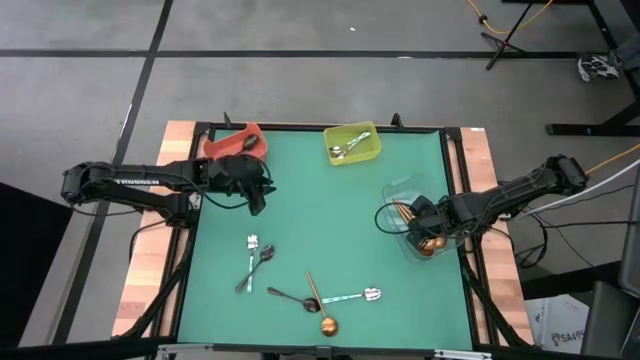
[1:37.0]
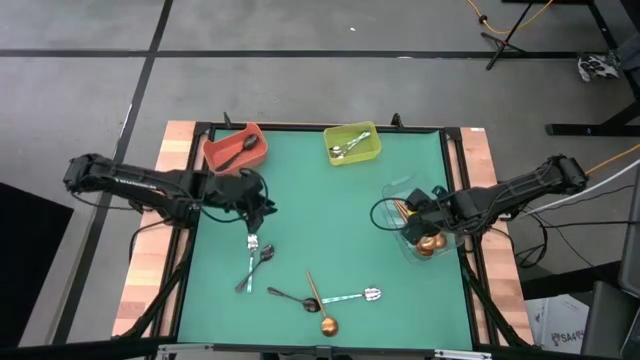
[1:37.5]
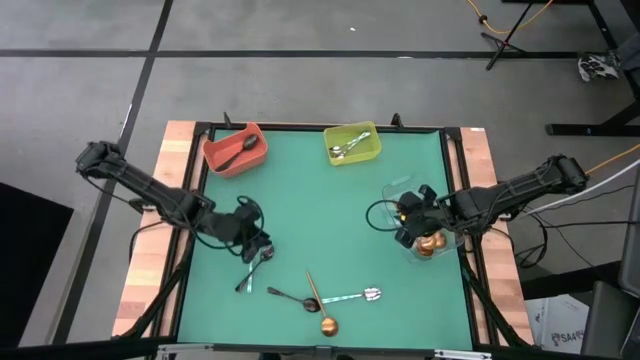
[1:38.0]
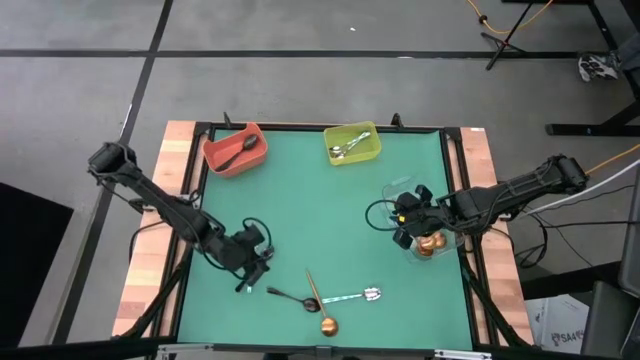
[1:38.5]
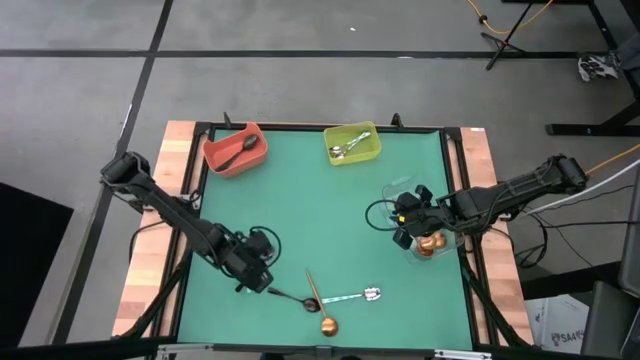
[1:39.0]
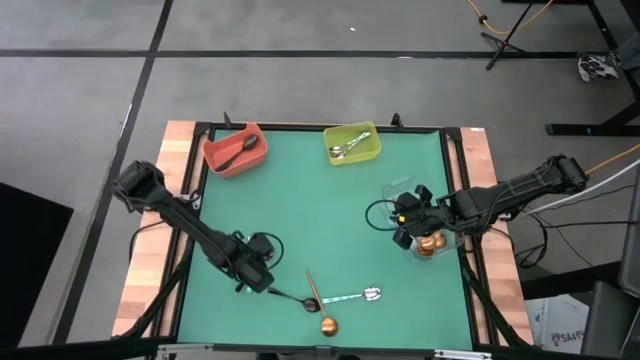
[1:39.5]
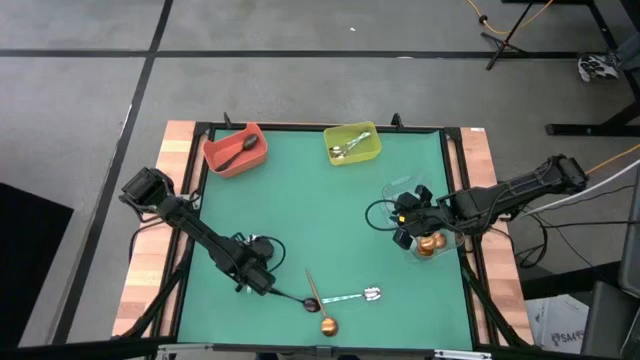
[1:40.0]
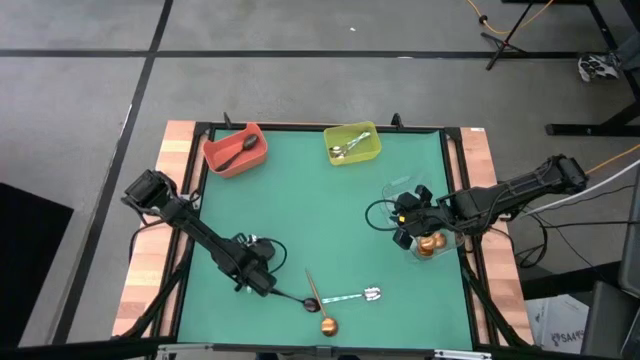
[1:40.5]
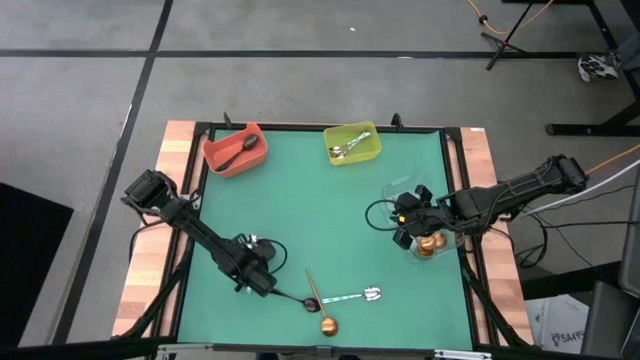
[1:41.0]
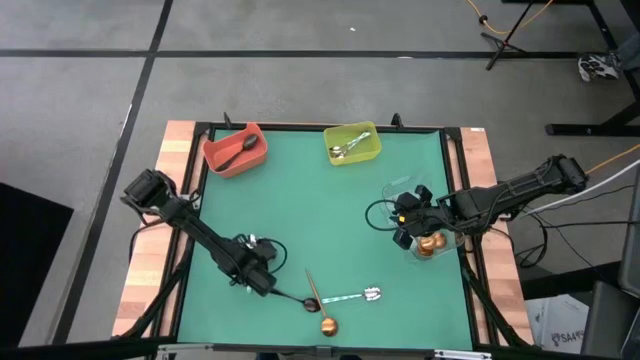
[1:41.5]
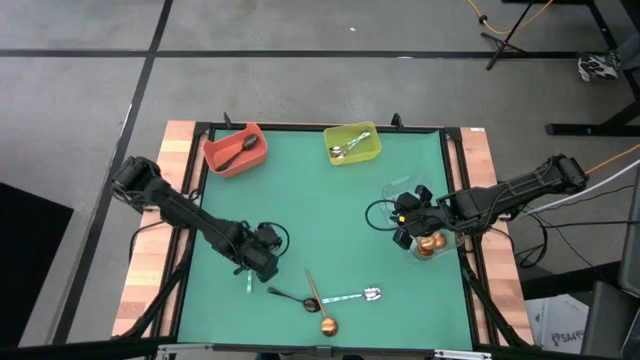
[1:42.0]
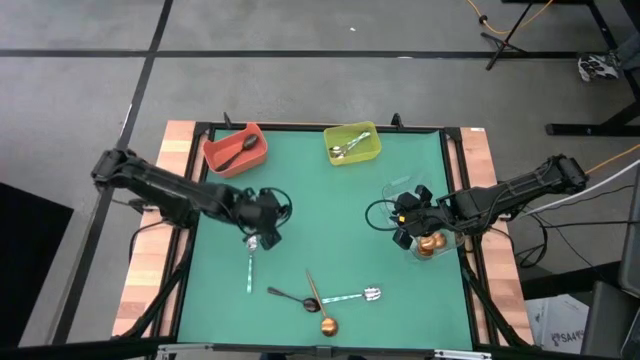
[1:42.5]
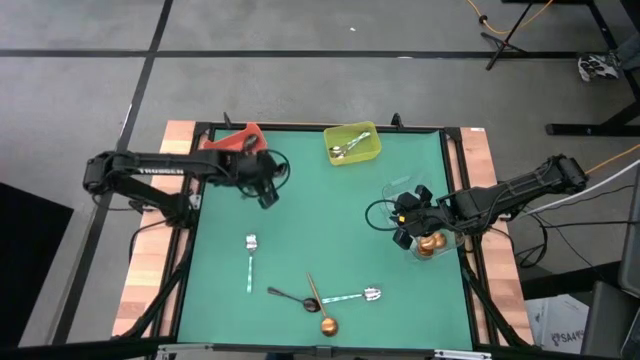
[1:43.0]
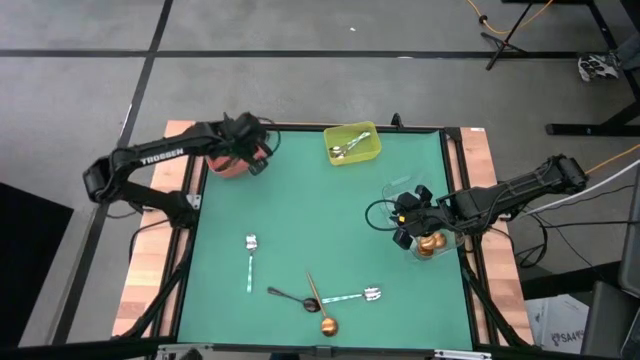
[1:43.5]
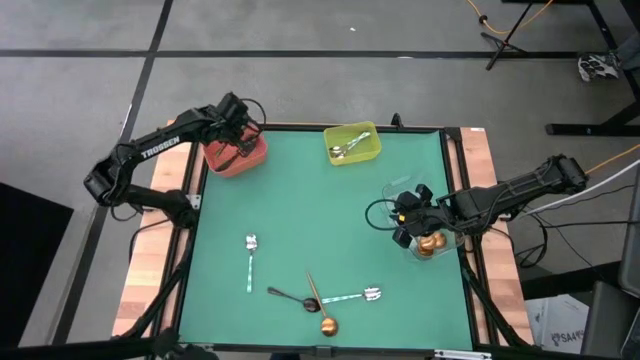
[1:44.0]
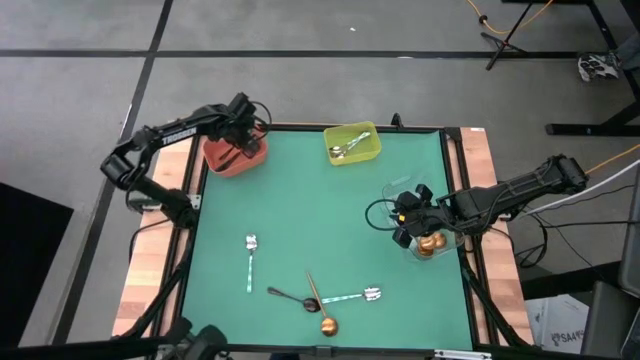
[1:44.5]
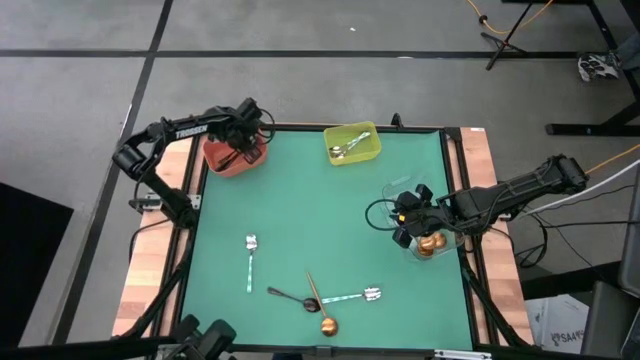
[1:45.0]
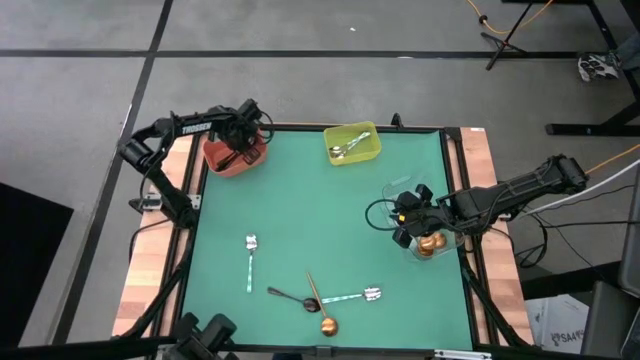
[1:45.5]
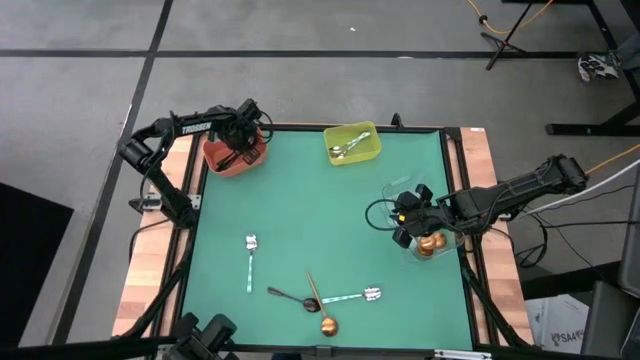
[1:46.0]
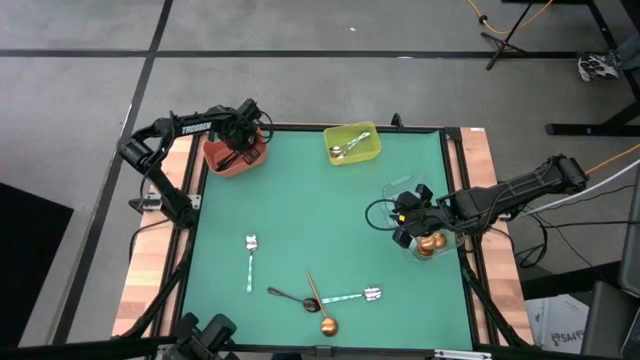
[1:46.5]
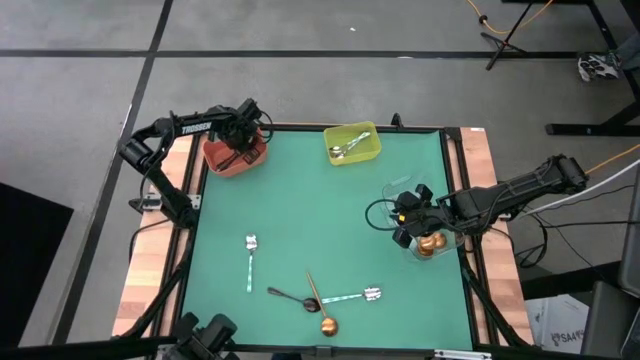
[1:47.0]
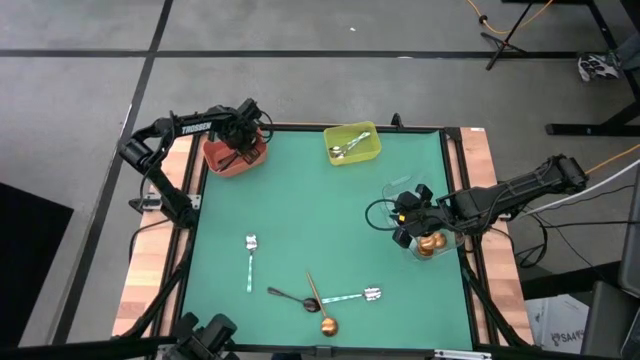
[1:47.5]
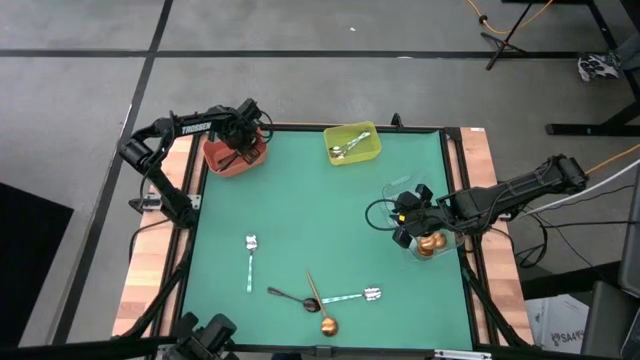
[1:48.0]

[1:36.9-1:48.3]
Task: Sort silverware by color (type)
Put the left black spoon into the orange bin

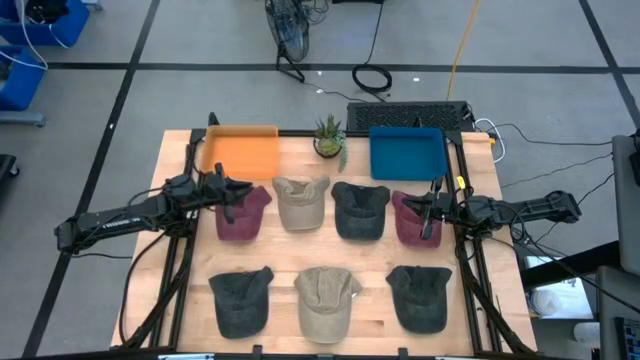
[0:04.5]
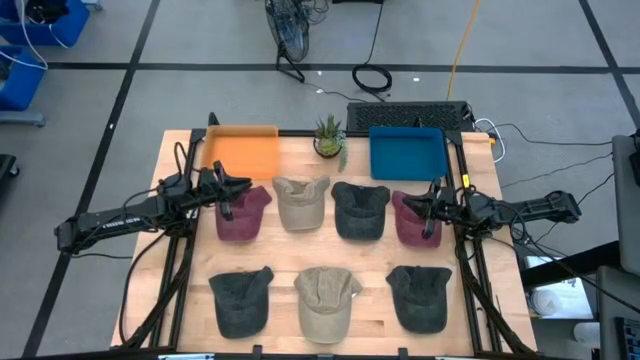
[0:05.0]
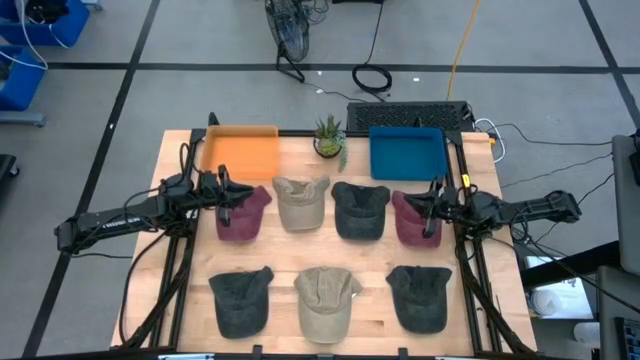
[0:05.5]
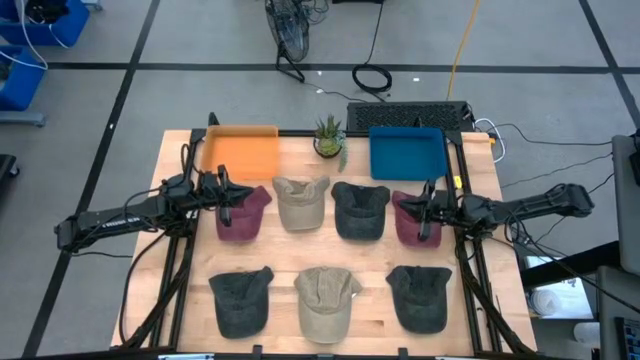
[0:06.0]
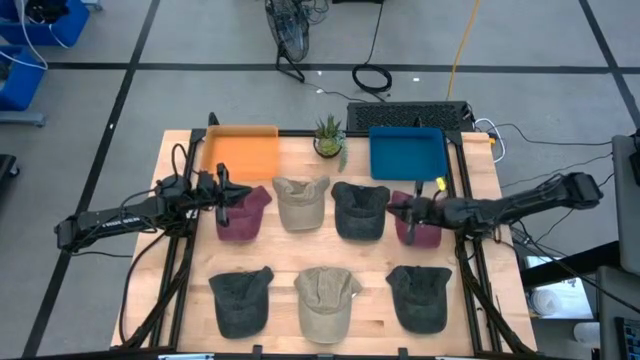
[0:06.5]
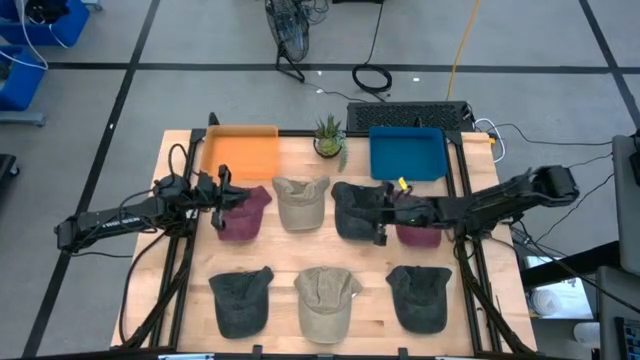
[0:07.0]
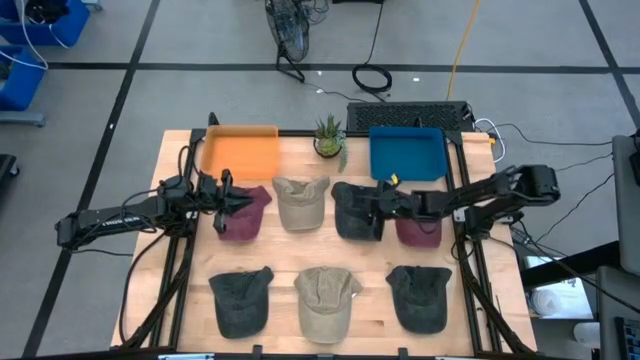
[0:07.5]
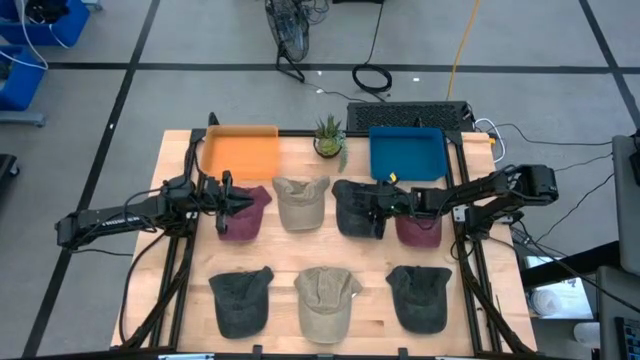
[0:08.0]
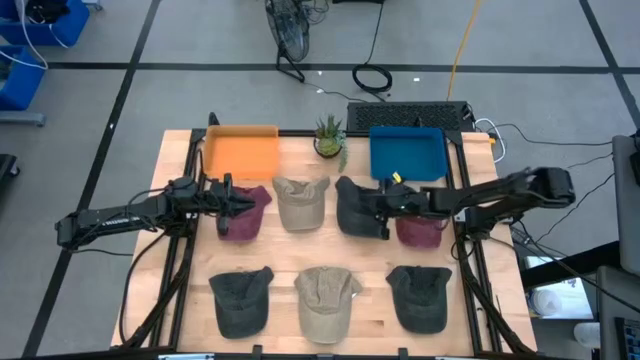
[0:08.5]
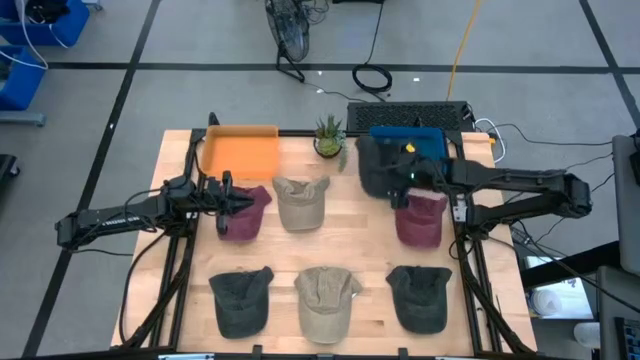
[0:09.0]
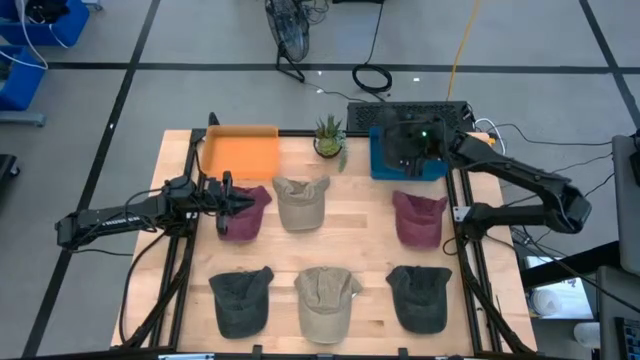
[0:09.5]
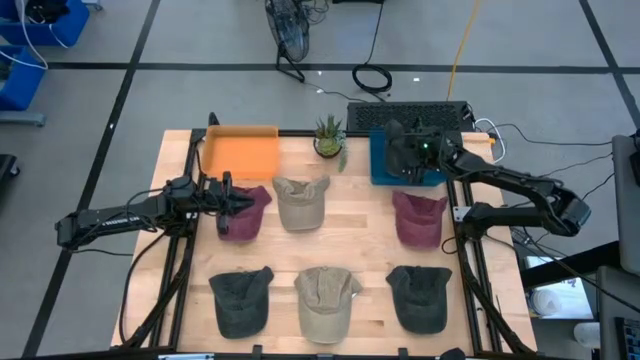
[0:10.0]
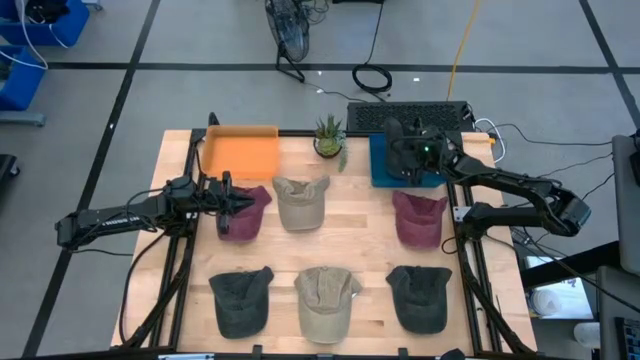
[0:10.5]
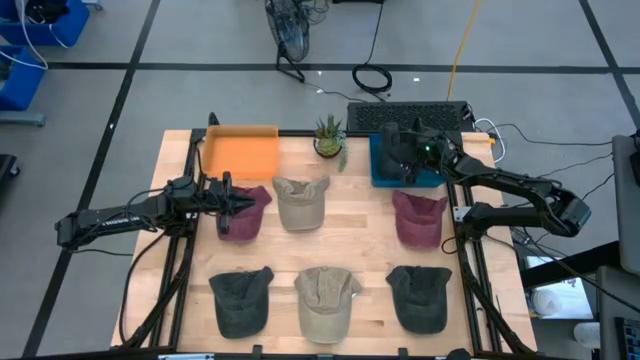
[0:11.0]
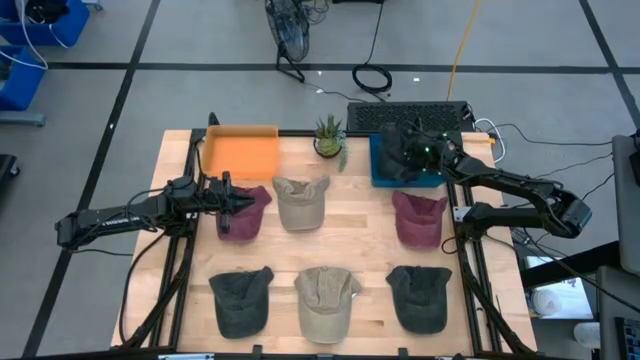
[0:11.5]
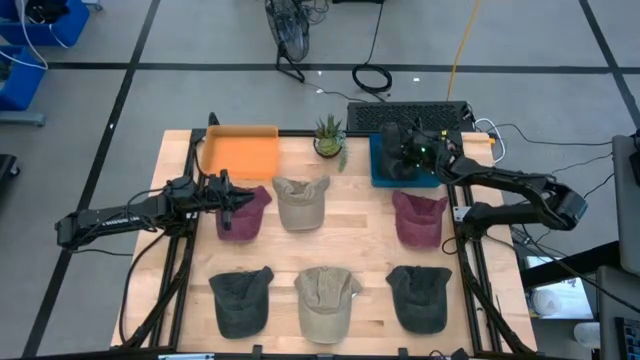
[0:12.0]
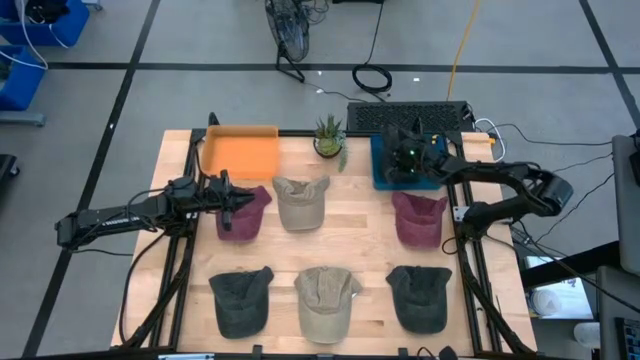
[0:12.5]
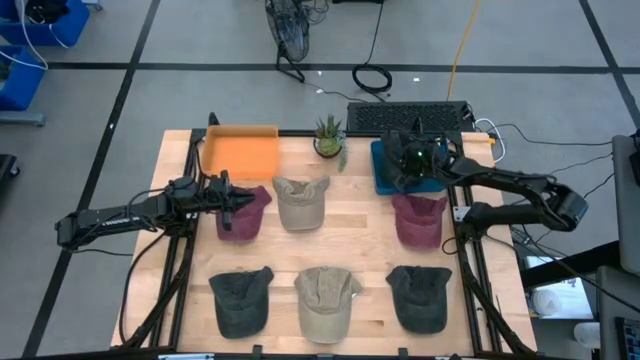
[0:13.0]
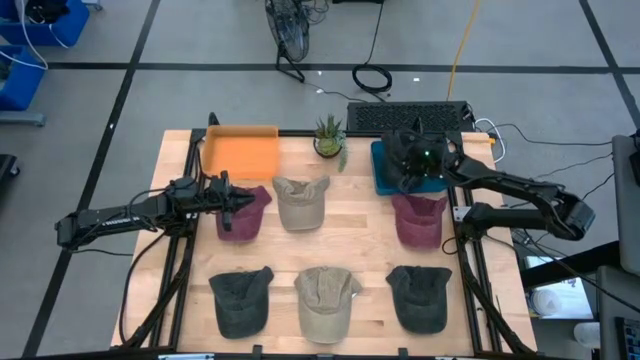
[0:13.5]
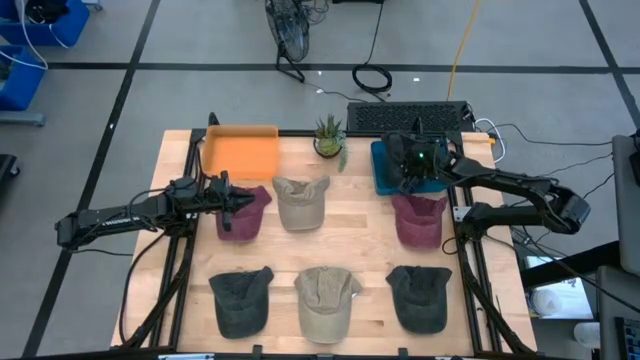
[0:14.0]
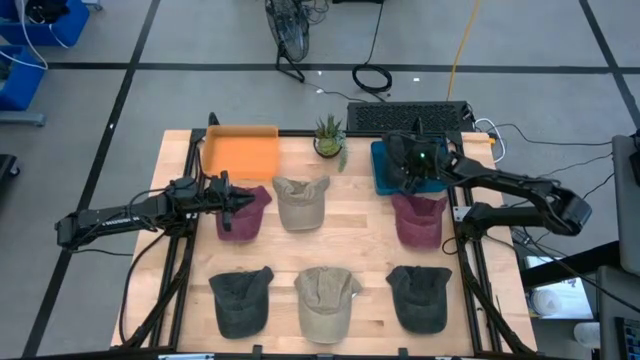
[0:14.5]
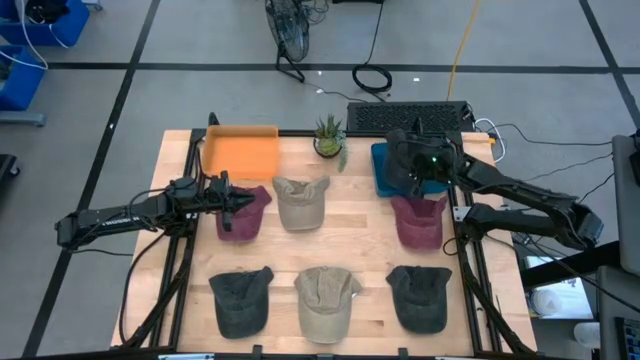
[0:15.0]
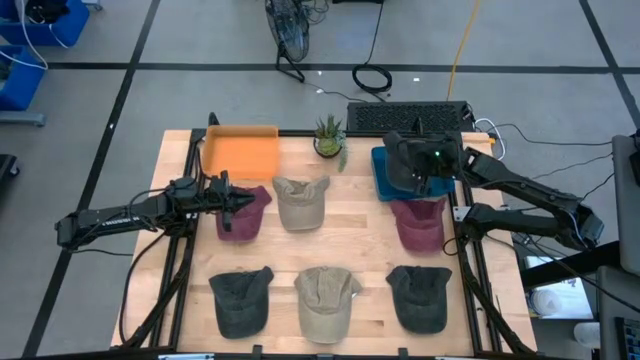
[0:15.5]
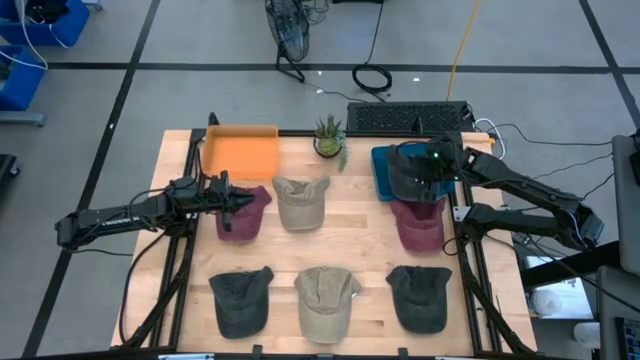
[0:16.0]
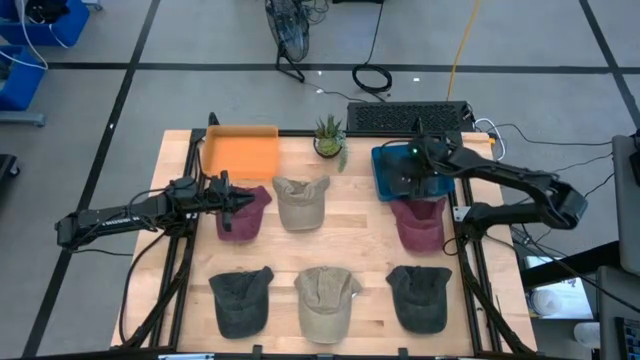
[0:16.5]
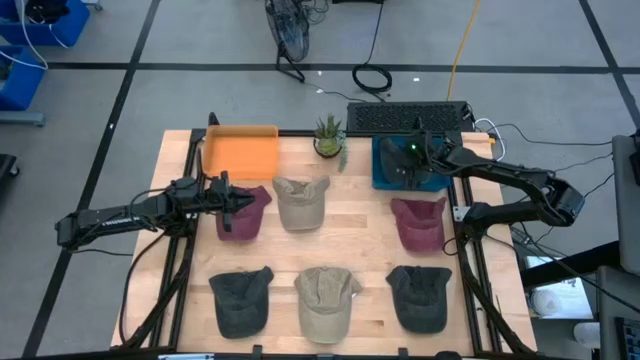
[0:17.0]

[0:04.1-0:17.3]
Task: Pick & Place hat
Put the top black cap into the blue bin
